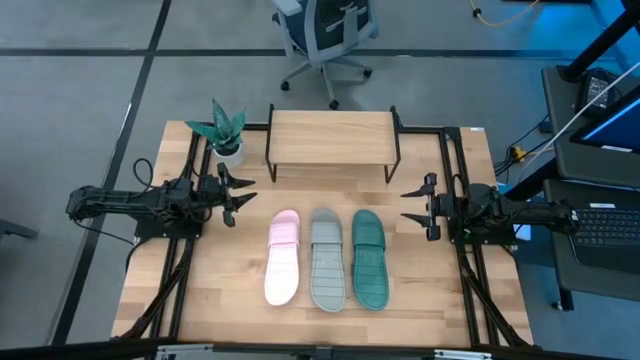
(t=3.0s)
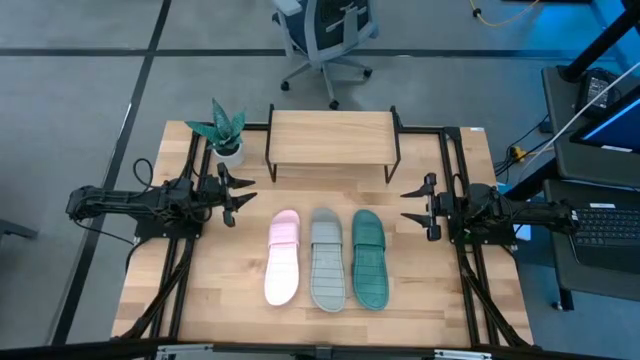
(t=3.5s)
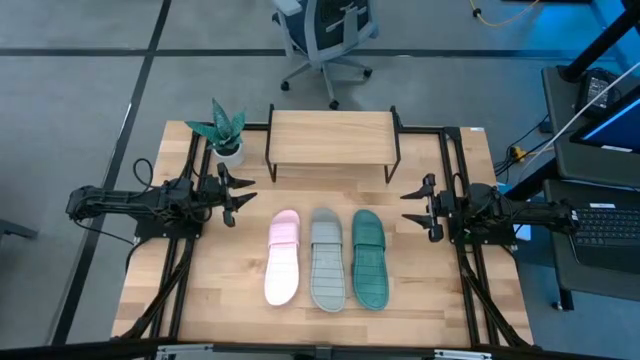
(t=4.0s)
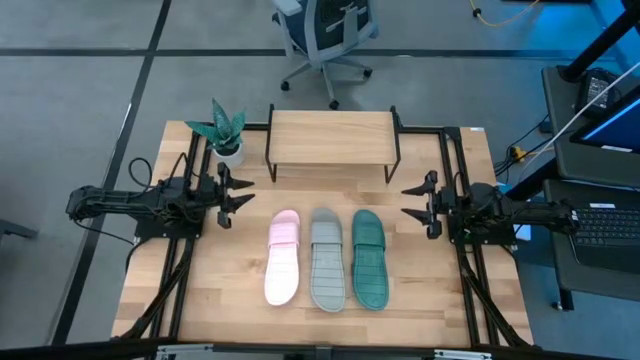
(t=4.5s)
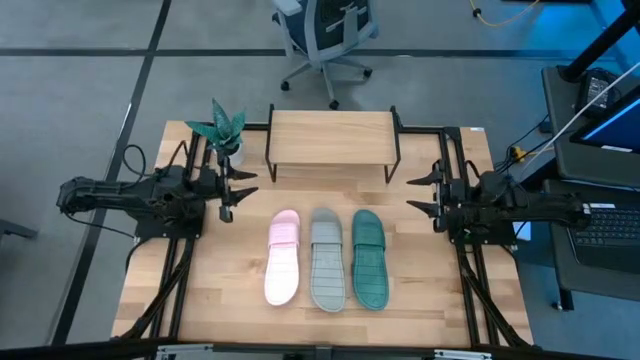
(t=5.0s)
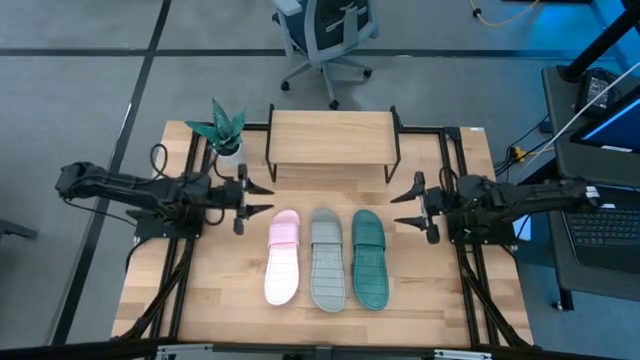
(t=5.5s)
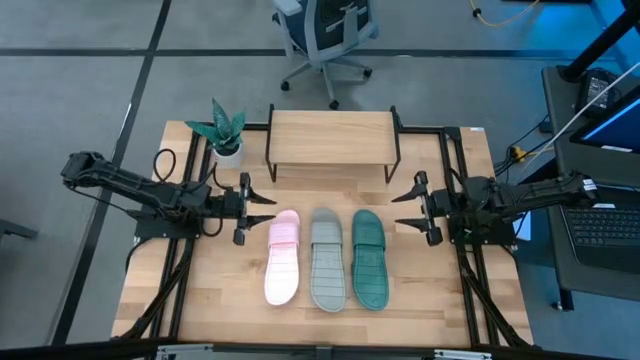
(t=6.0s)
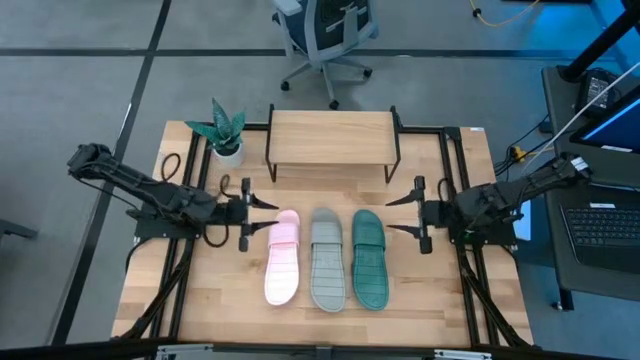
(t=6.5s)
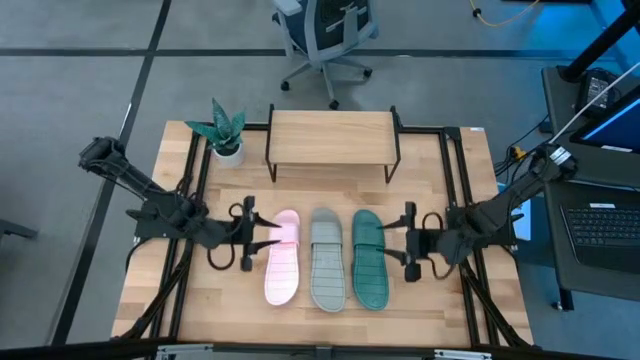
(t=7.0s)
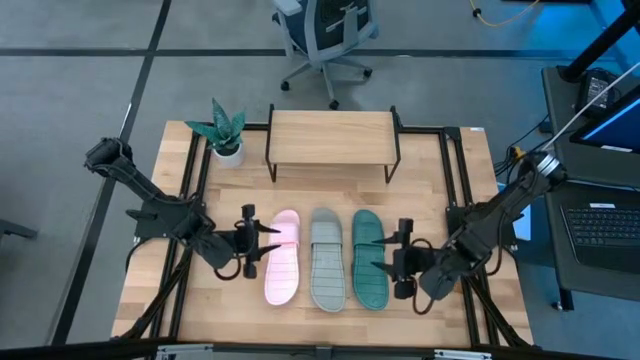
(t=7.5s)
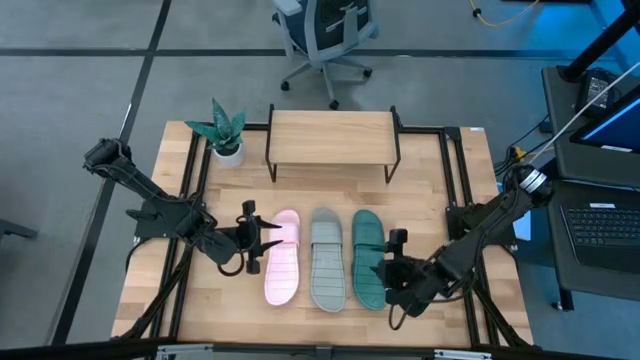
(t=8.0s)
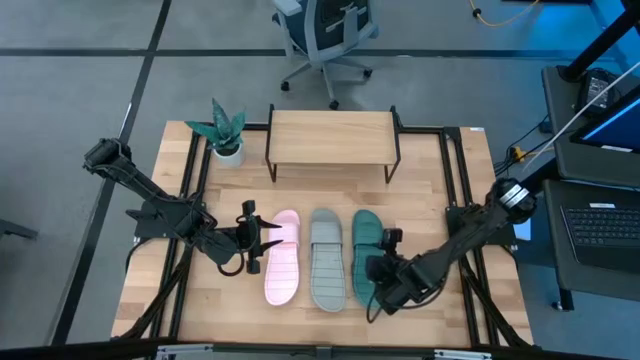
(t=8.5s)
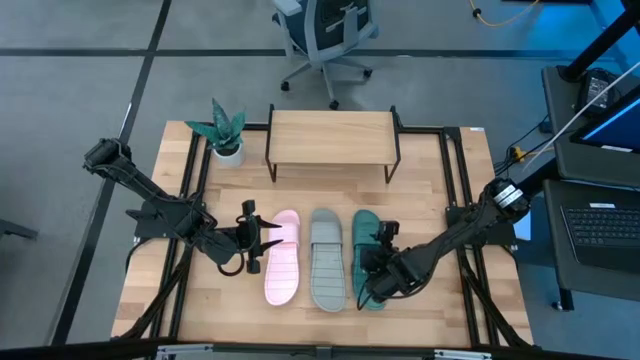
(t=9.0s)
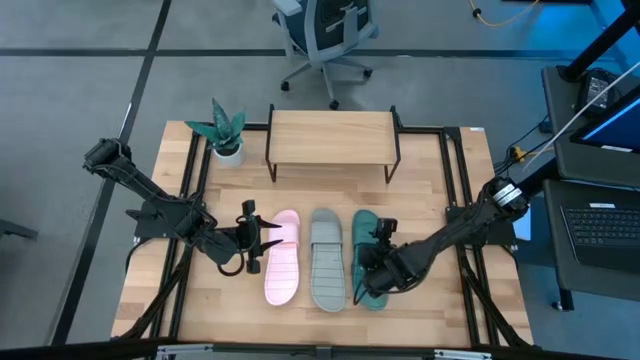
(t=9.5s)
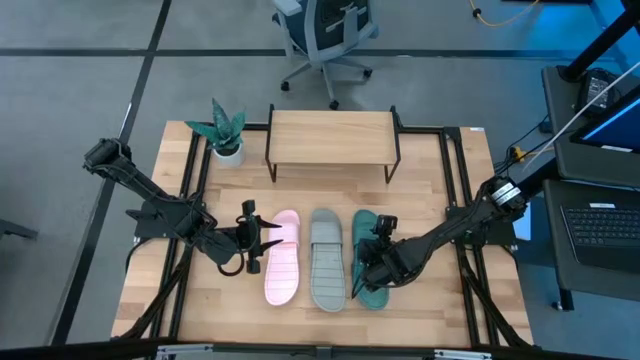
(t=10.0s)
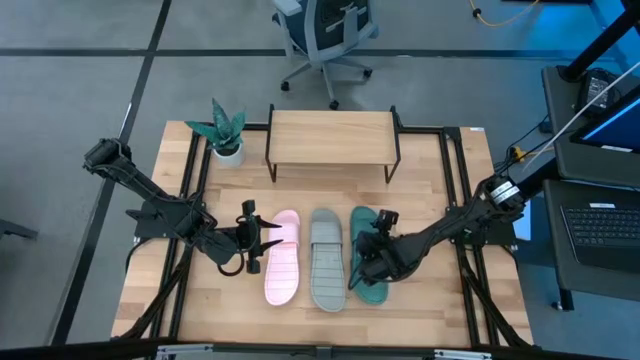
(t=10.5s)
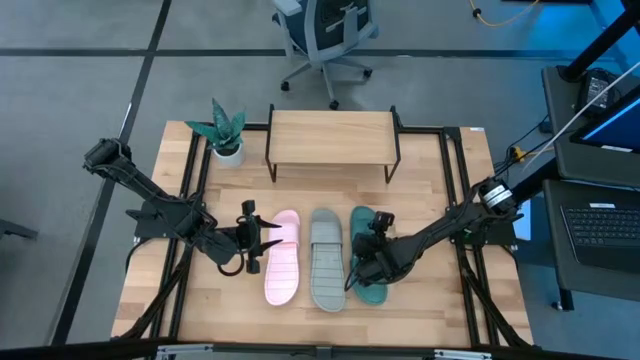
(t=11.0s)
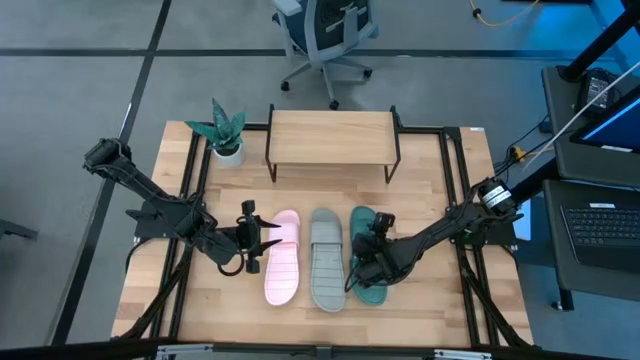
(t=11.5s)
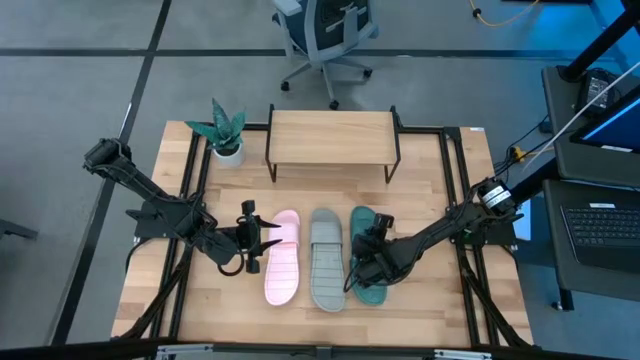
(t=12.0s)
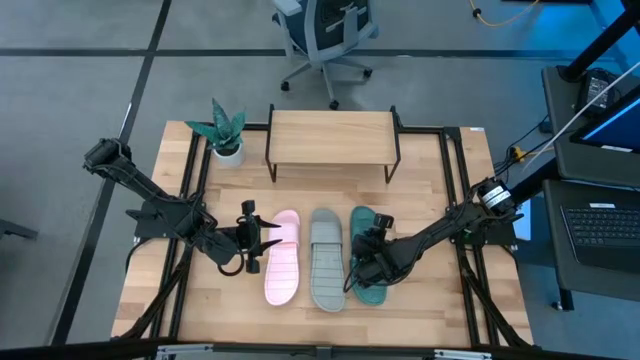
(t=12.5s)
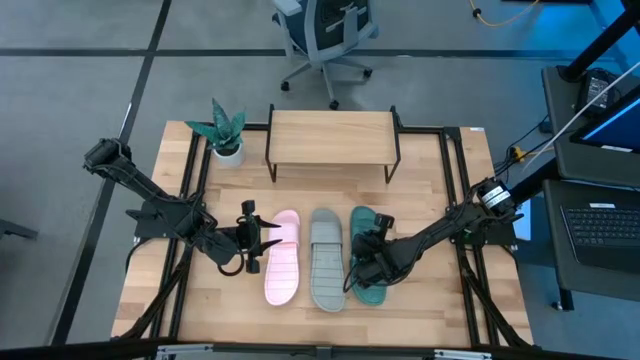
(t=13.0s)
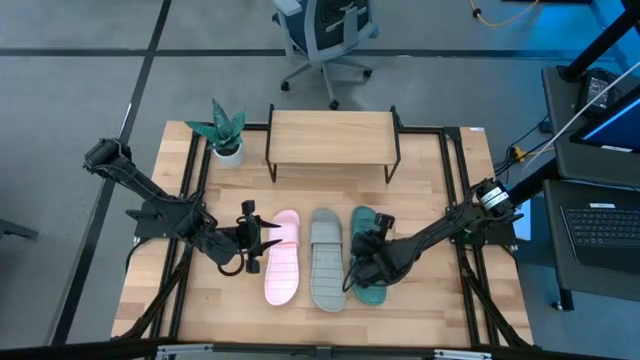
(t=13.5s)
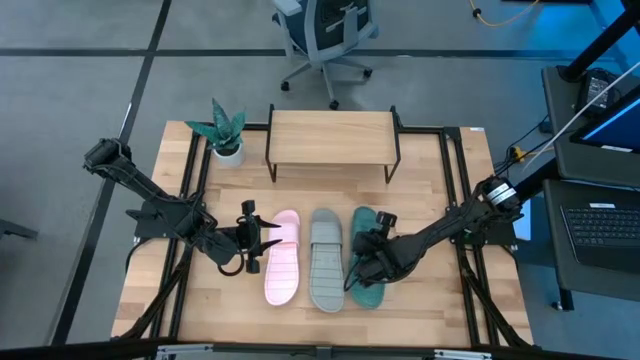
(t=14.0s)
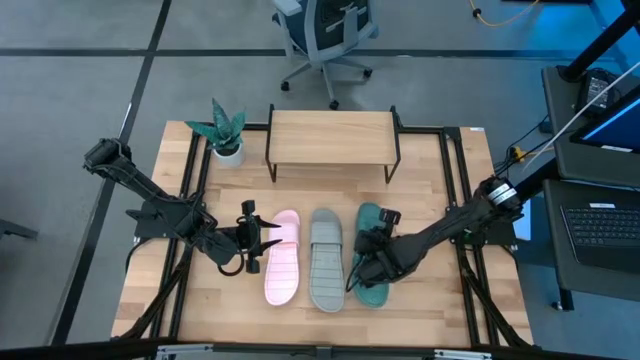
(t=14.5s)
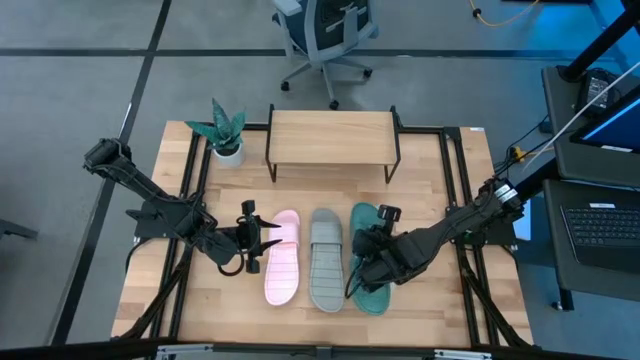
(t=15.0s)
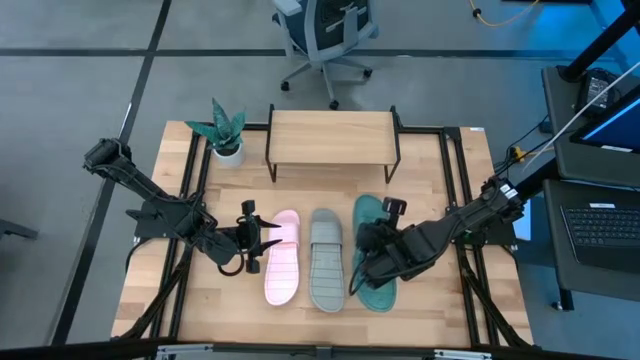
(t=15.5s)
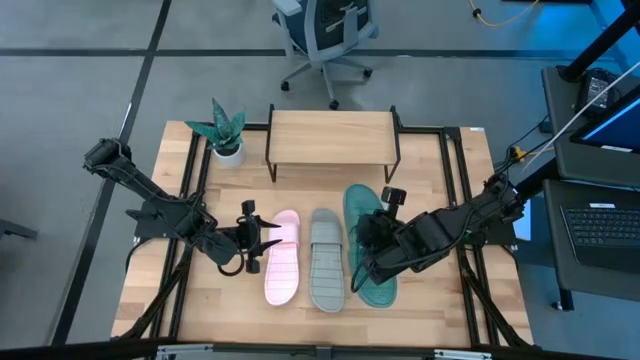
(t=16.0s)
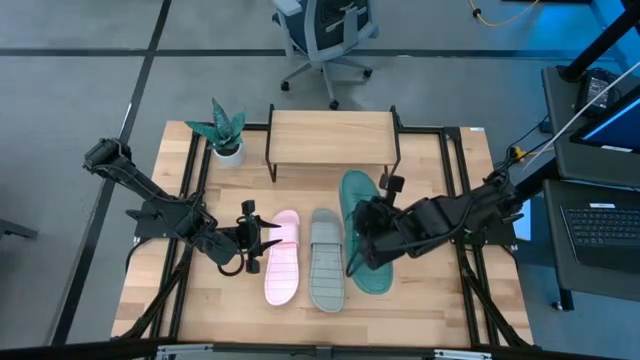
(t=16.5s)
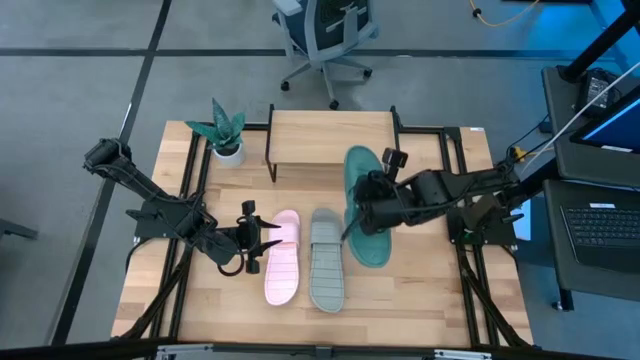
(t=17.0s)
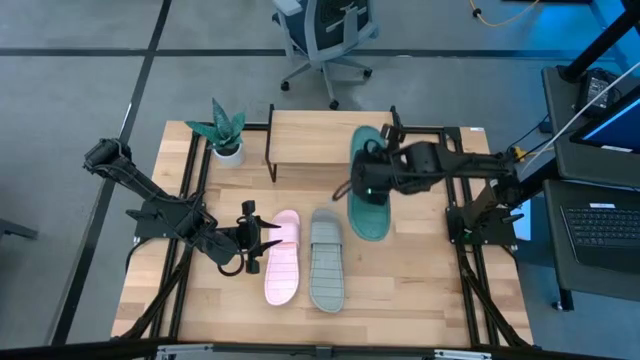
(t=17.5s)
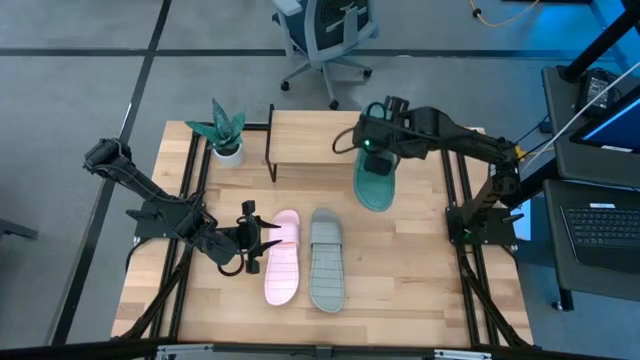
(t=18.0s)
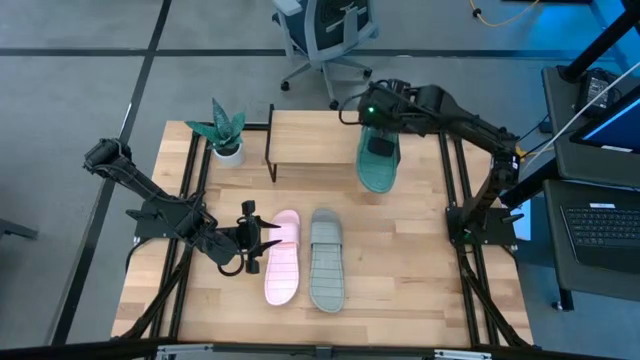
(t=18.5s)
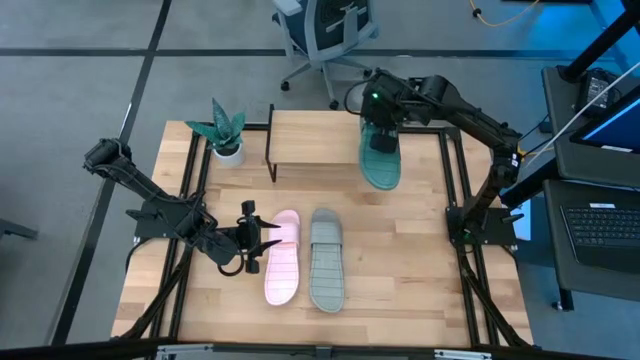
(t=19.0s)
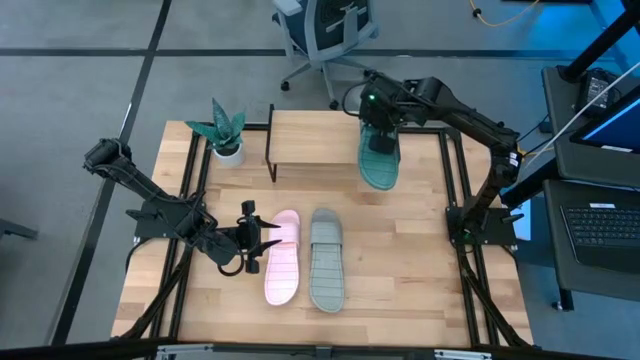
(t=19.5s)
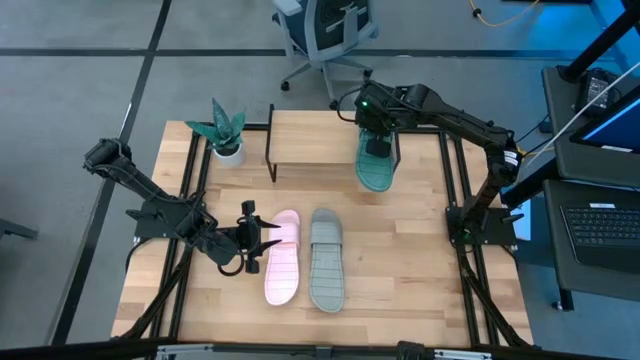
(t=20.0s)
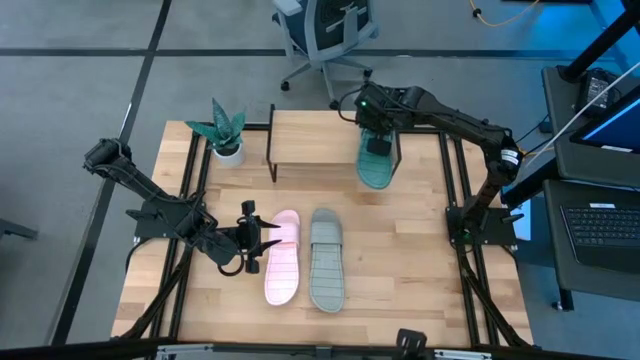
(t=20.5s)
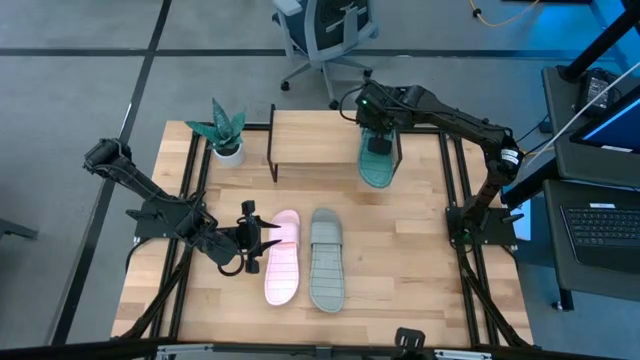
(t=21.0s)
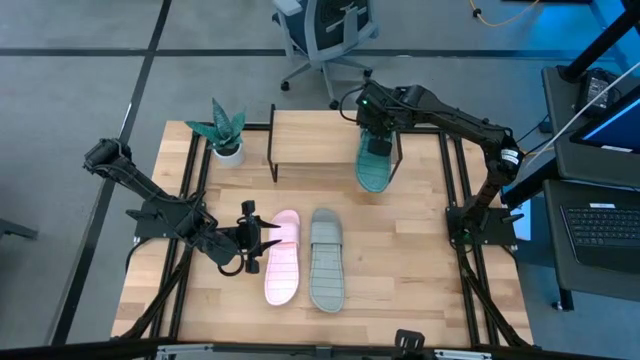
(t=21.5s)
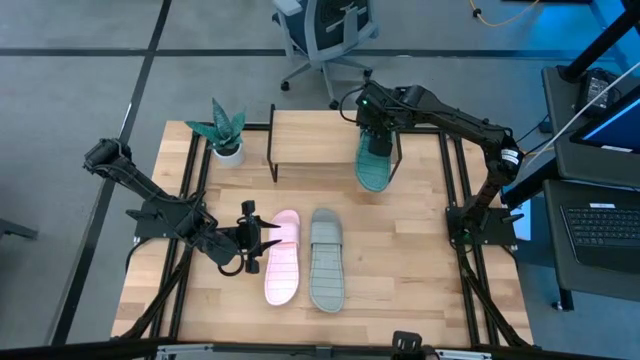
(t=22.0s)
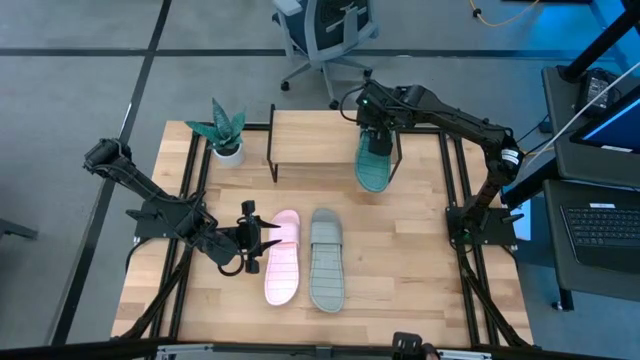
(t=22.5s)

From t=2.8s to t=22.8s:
Task: Pick and place slides into the shelf
Put the pair of dark green slides on the shelf
